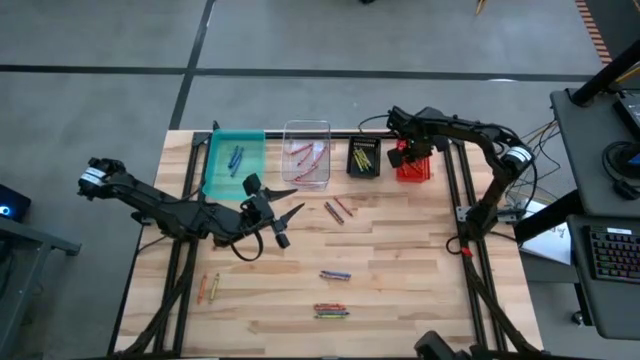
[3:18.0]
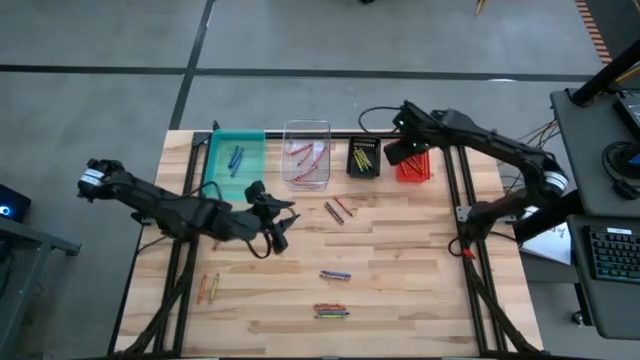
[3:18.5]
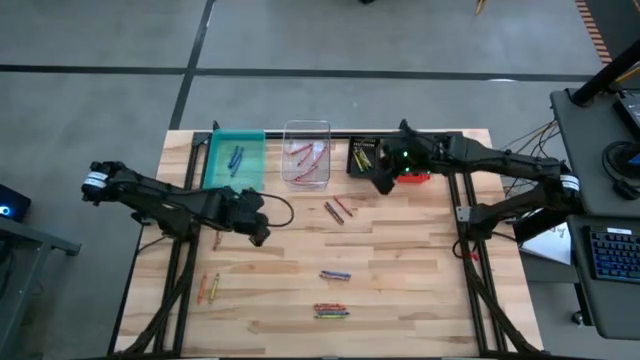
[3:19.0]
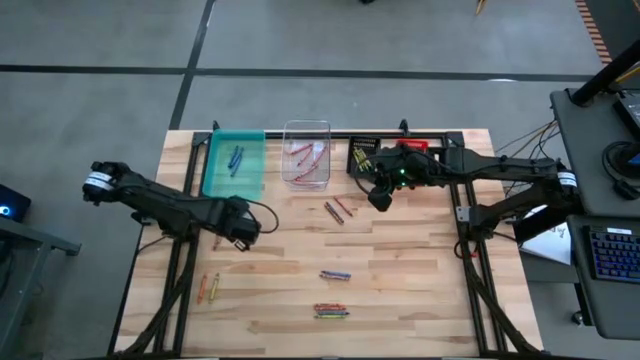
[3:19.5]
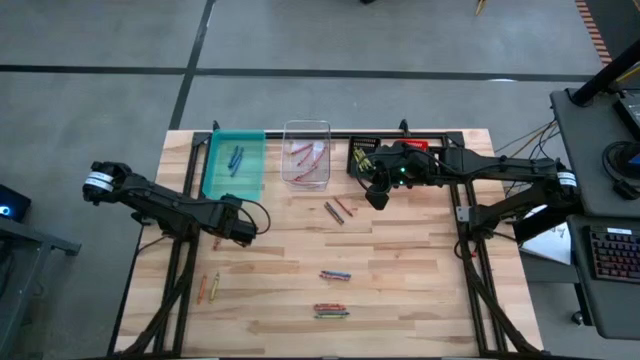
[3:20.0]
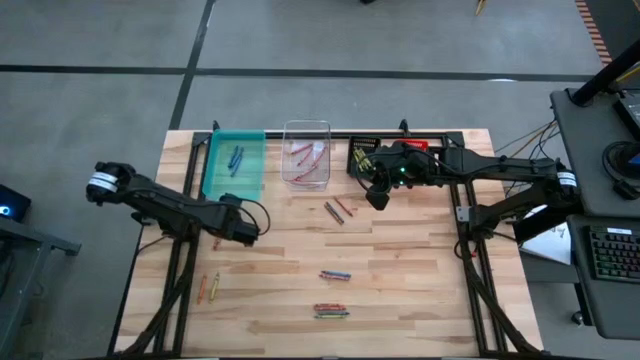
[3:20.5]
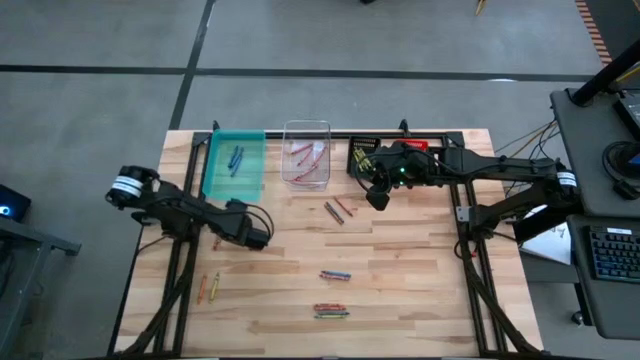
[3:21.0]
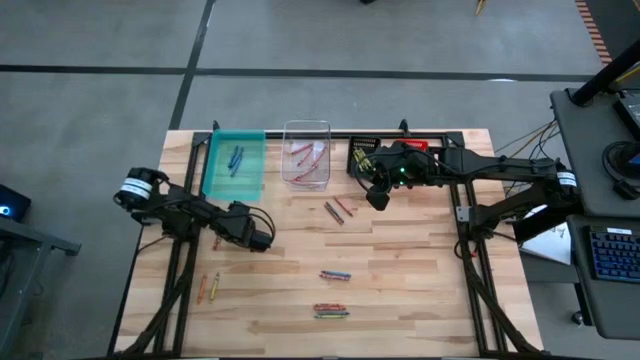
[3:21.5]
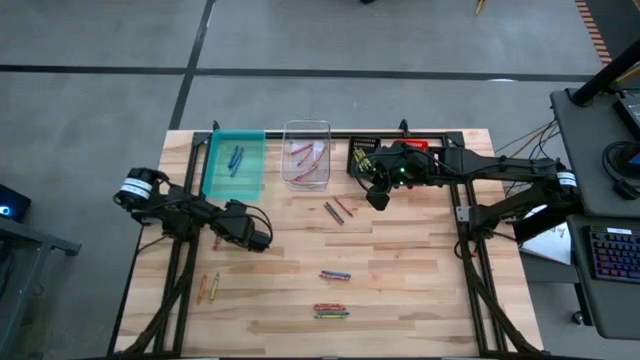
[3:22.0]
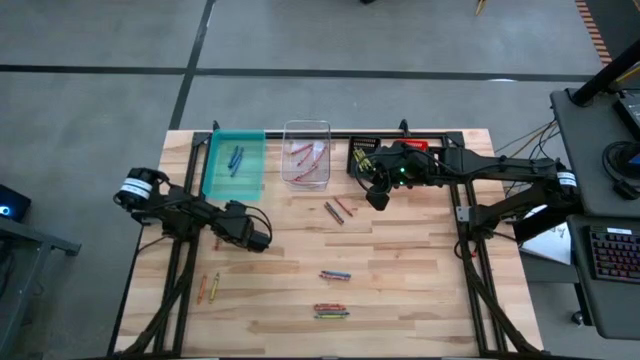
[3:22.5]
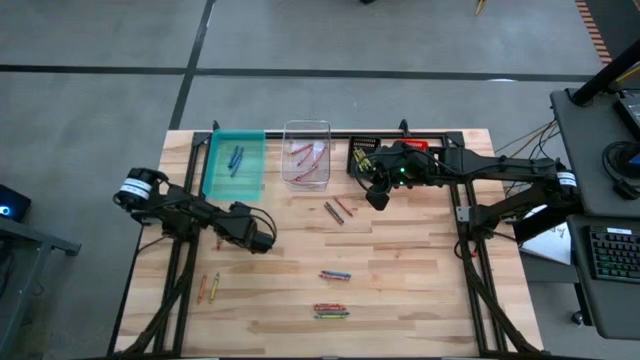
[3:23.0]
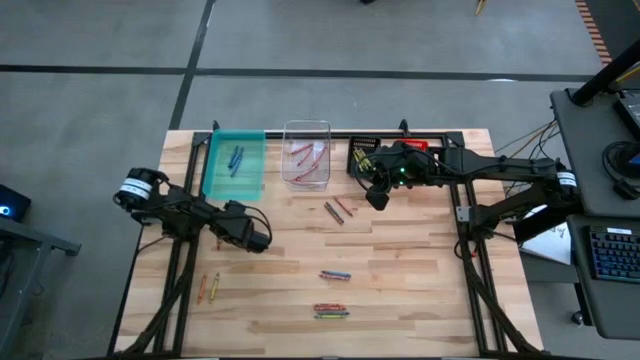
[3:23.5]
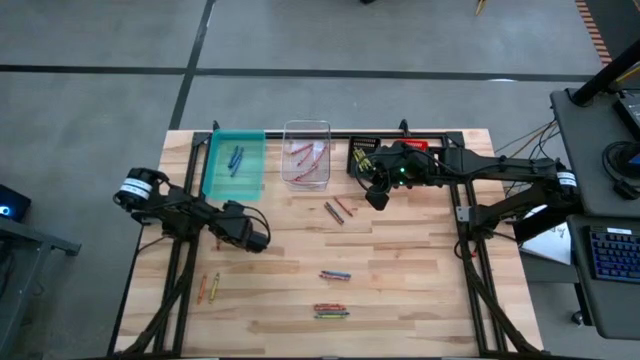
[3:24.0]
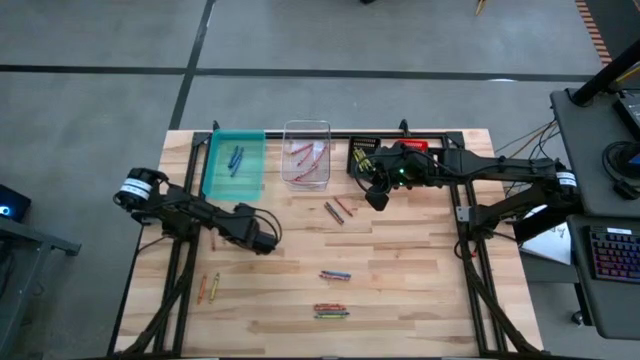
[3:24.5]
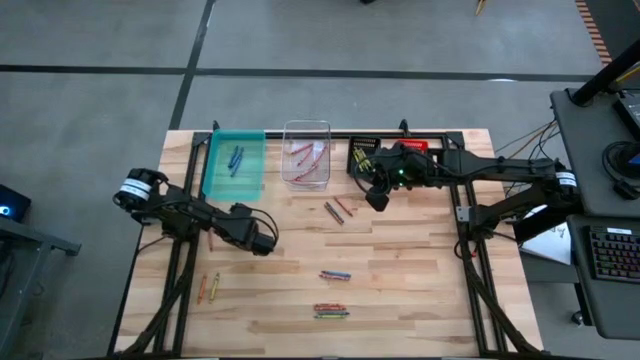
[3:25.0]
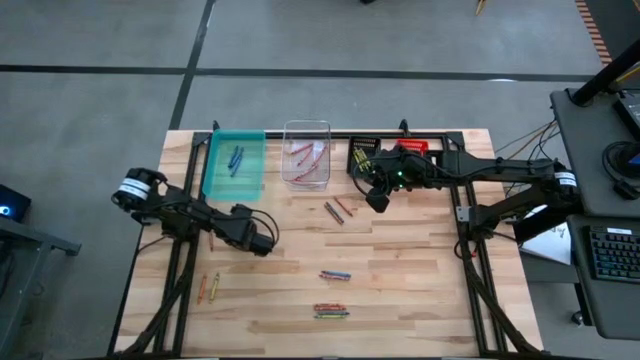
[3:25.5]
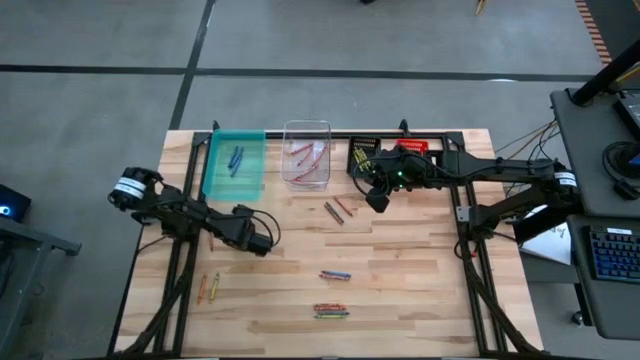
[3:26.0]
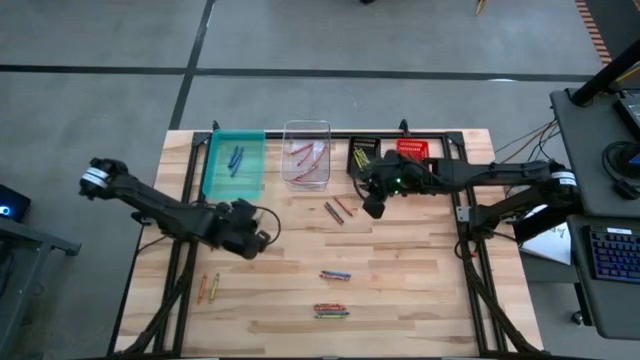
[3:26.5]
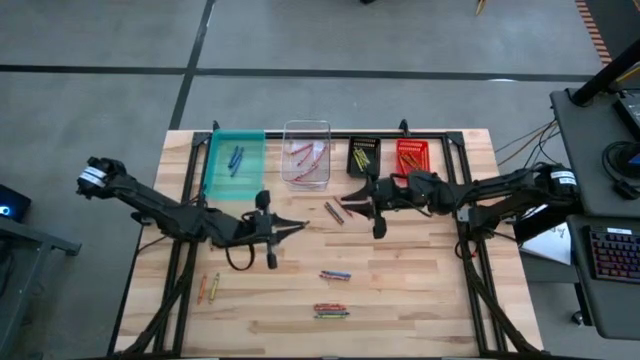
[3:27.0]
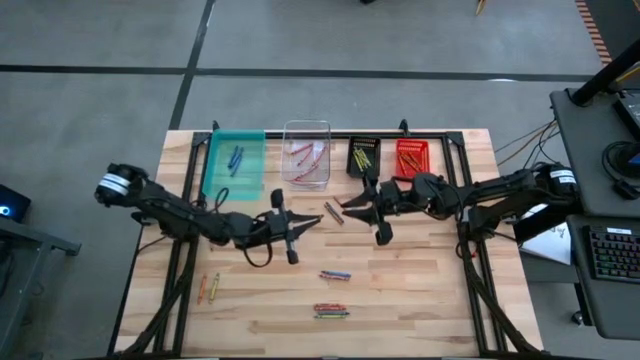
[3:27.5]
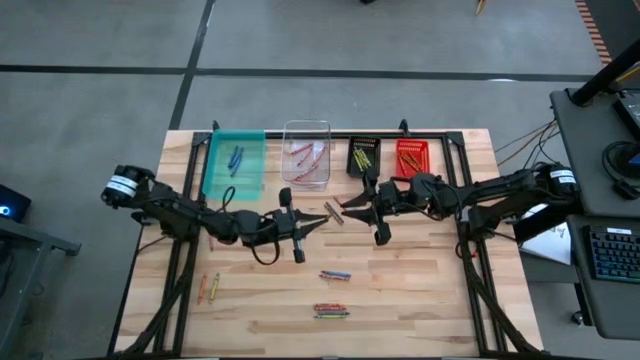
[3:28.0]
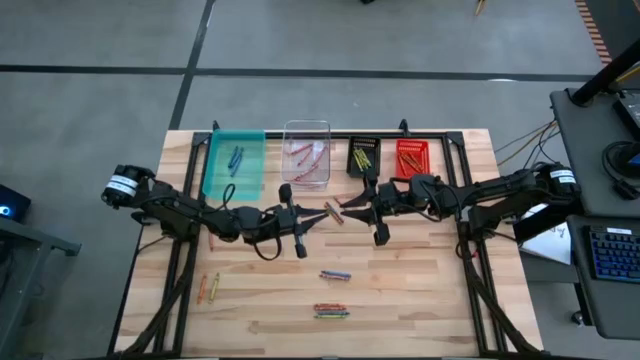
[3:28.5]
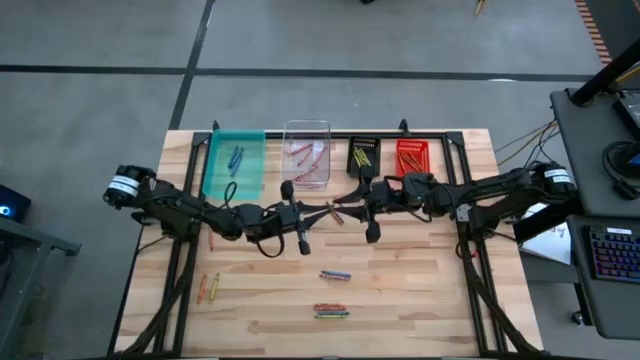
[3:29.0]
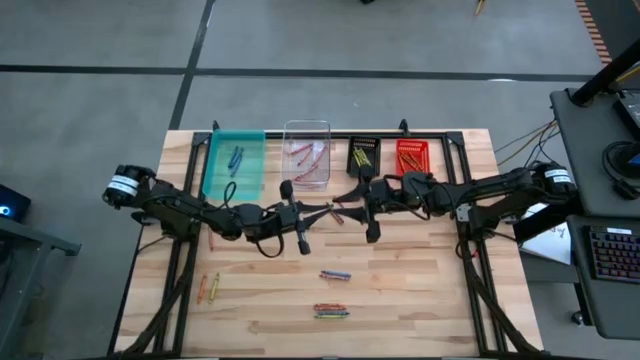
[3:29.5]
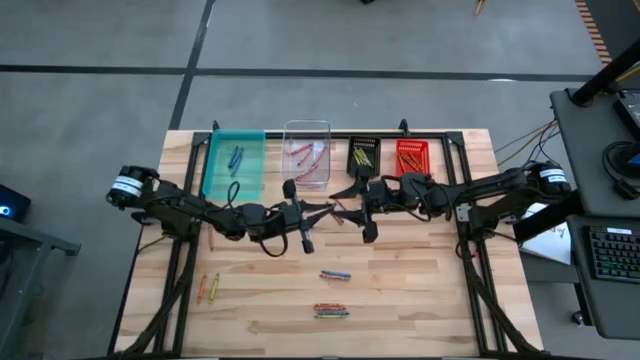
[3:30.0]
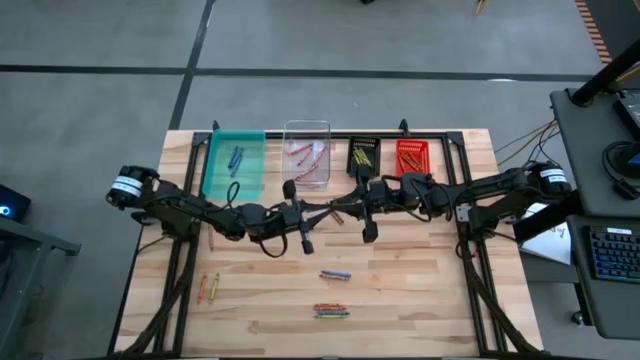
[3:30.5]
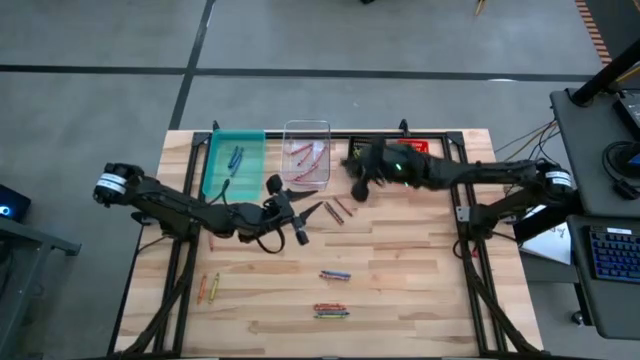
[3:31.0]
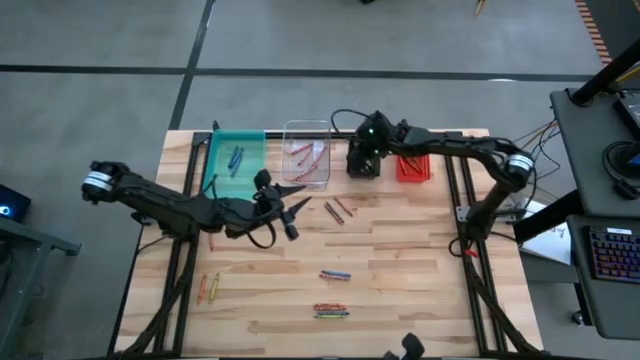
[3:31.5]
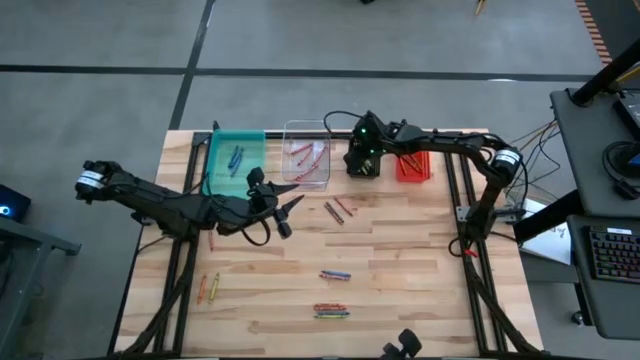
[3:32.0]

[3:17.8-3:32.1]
Task: Sort crayons
Put the green crayon into the black bin

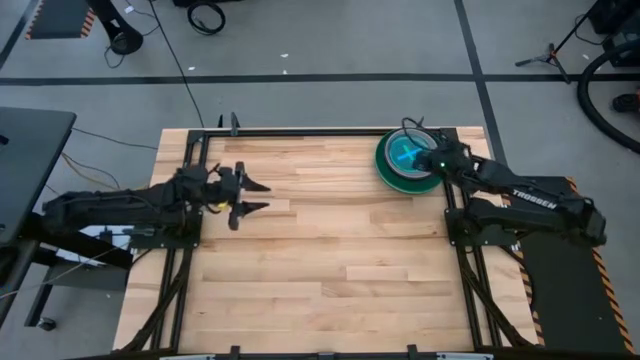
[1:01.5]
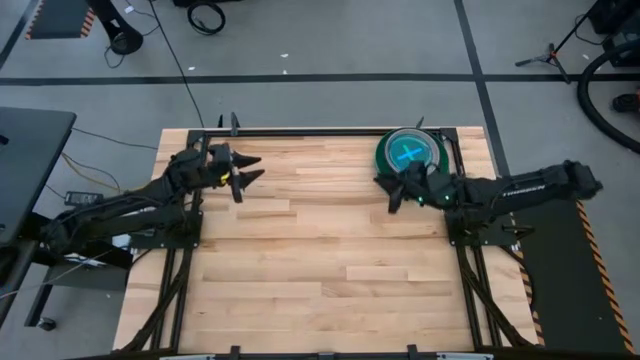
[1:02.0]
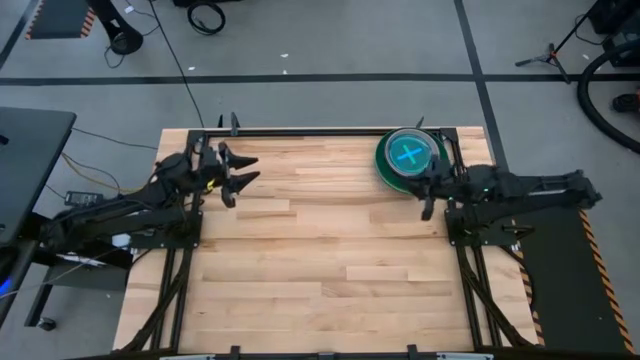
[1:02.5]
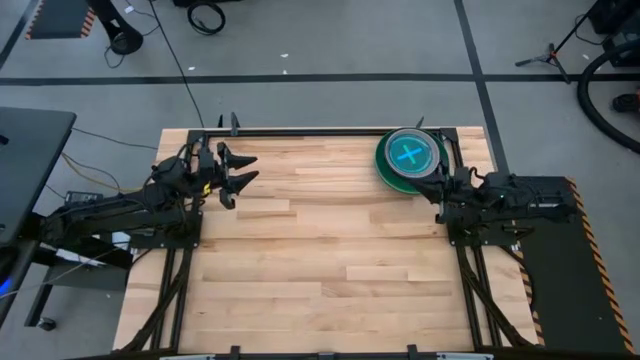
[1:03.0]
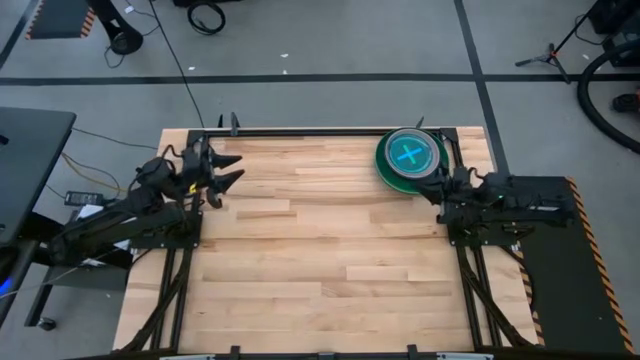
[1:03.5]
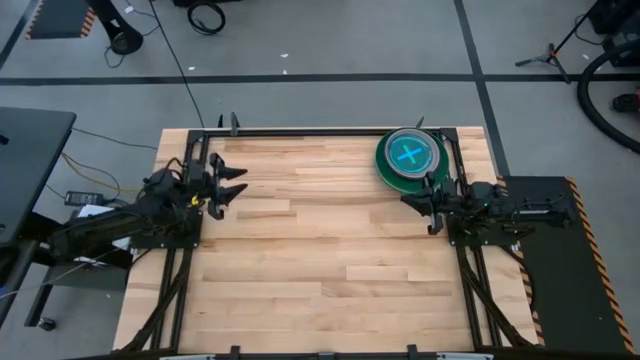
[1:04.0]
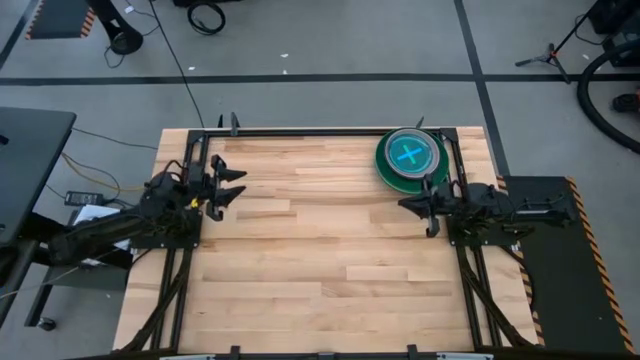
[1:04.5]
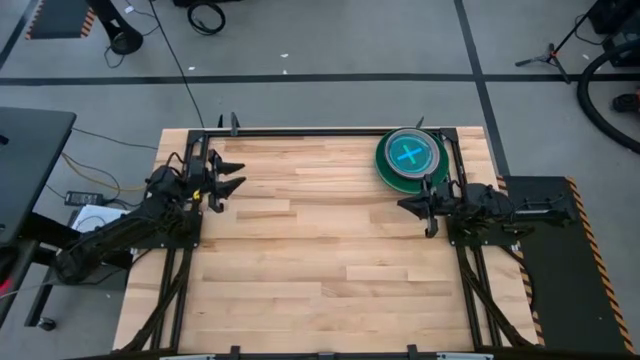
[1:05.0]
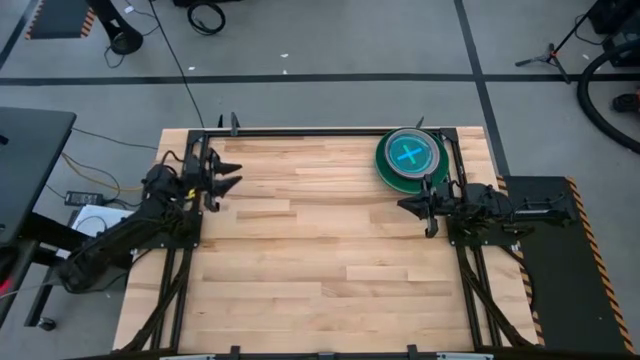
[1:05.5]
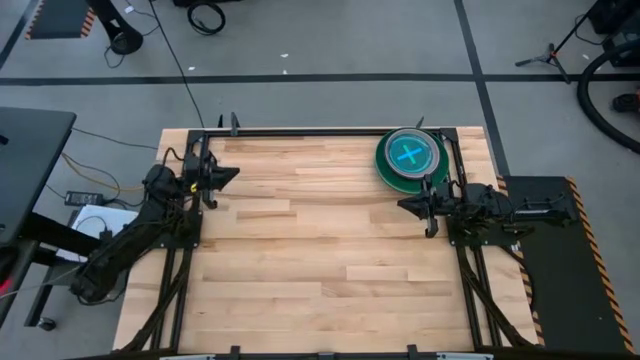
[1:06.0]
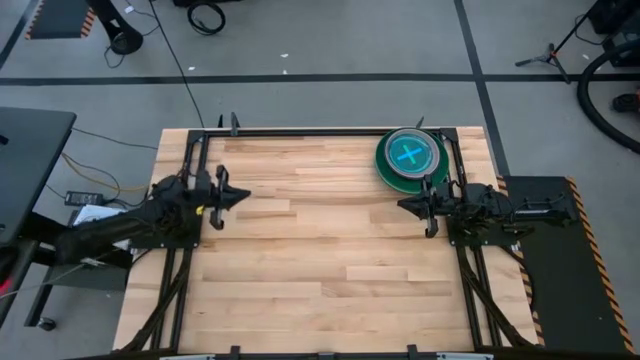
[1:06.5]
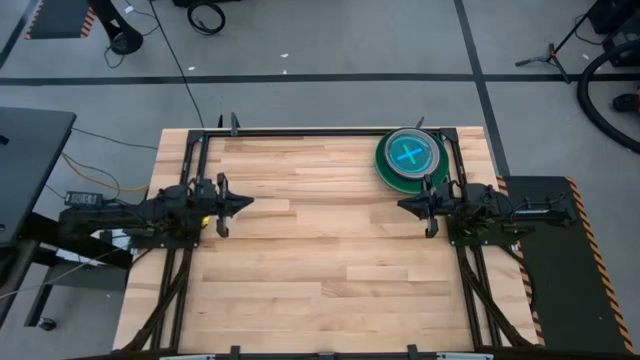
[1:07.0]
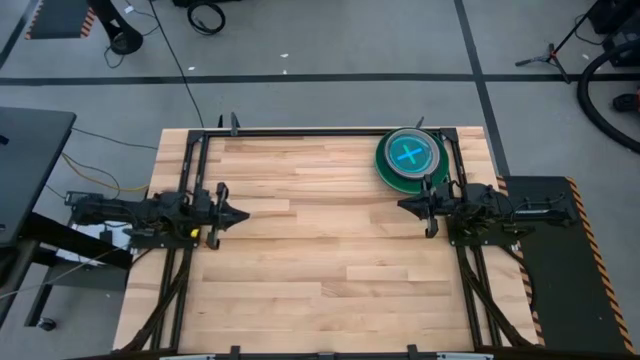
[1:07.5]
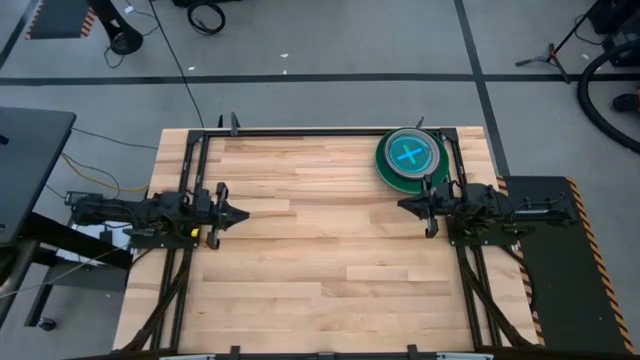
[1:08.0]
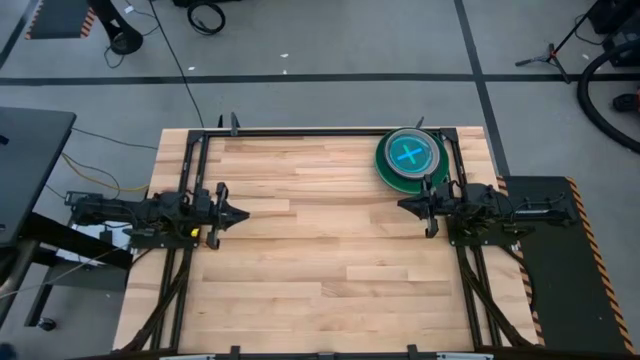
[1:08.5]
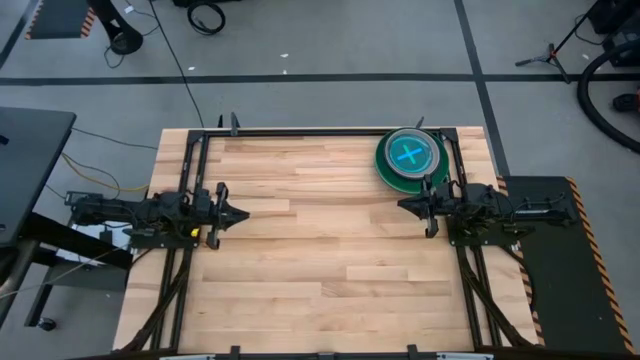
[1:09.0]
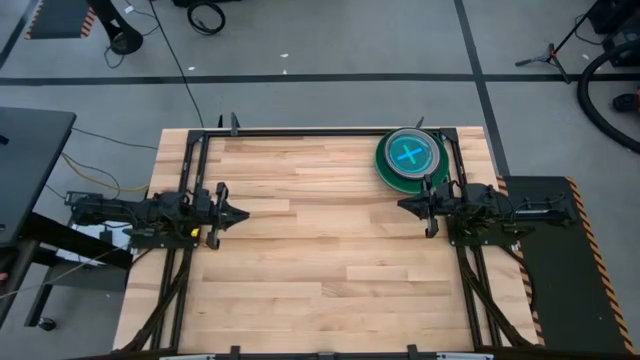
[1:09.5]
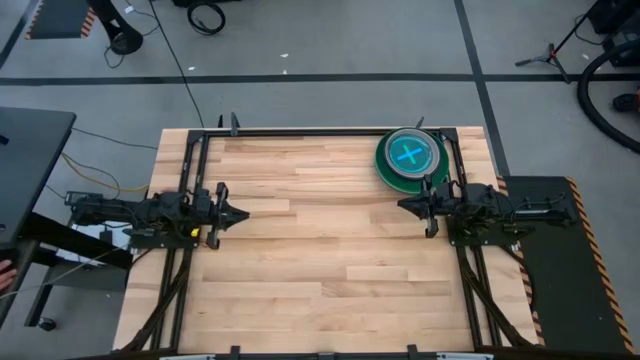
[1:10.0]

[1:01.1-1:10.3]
Task: Stack plastic plates
Return to Home Position
